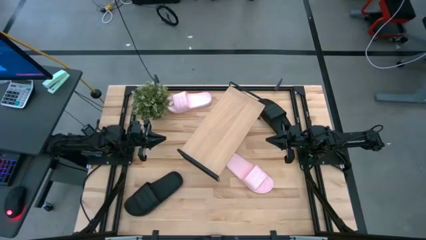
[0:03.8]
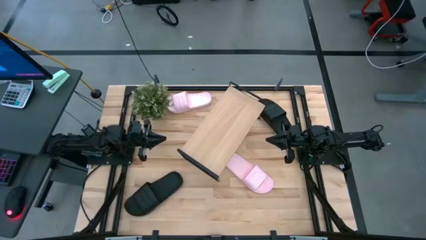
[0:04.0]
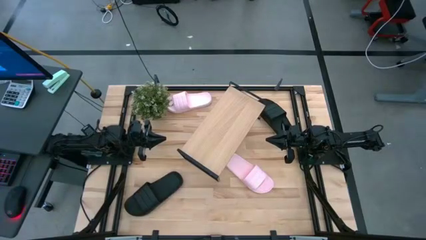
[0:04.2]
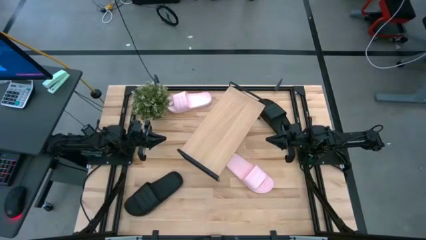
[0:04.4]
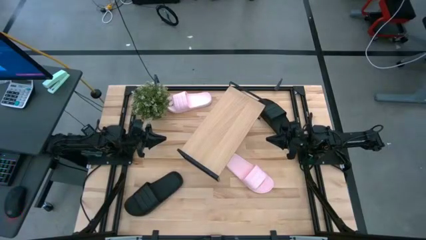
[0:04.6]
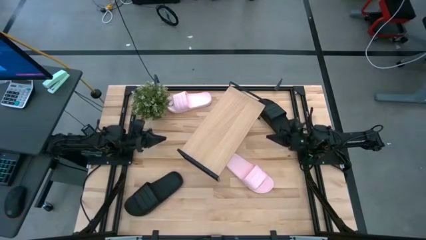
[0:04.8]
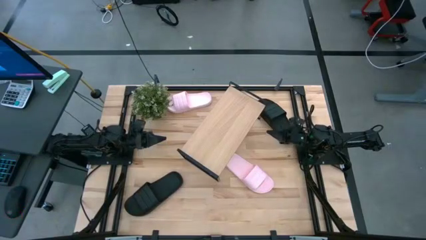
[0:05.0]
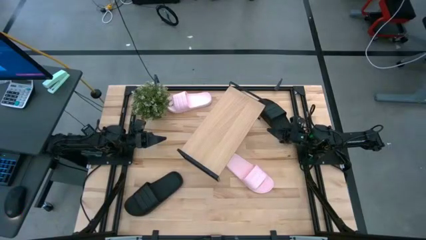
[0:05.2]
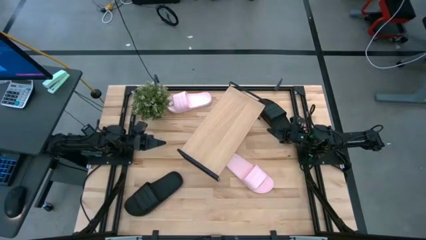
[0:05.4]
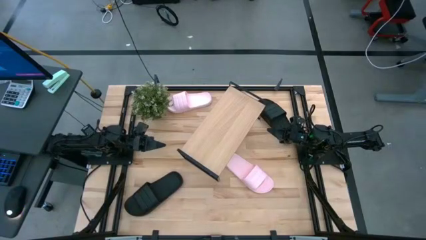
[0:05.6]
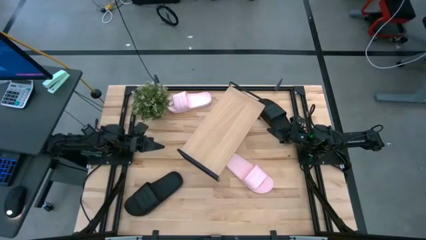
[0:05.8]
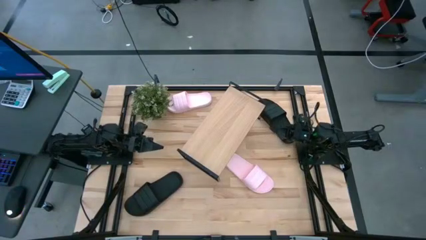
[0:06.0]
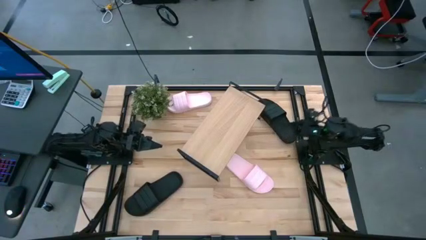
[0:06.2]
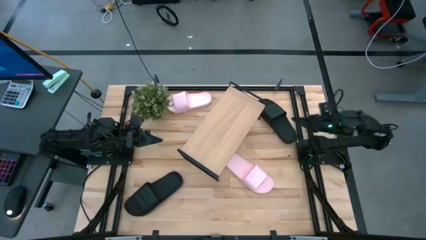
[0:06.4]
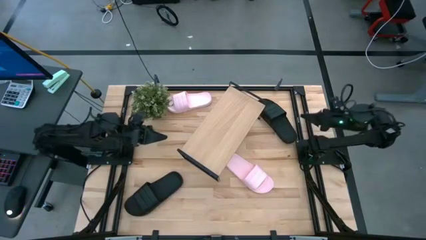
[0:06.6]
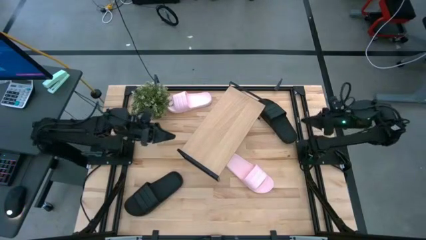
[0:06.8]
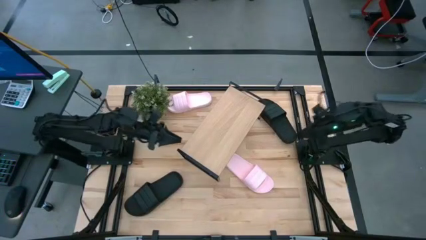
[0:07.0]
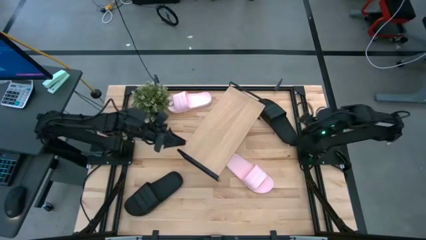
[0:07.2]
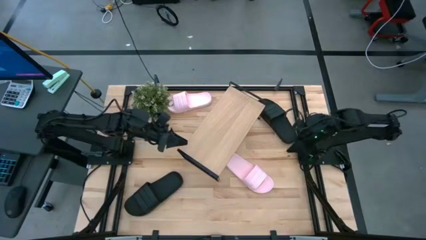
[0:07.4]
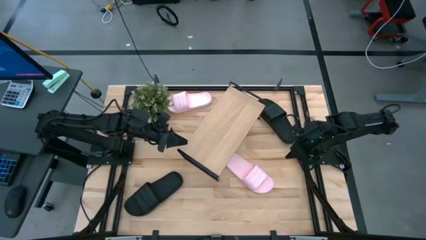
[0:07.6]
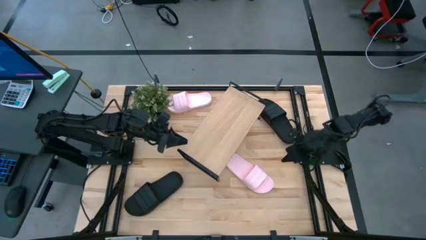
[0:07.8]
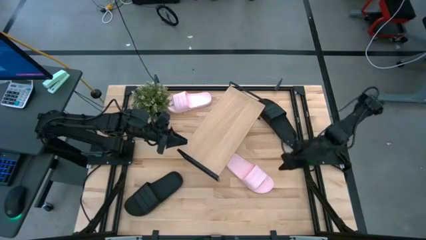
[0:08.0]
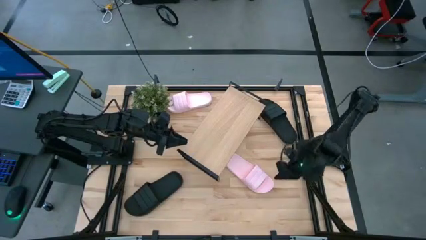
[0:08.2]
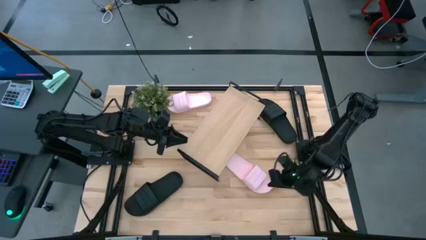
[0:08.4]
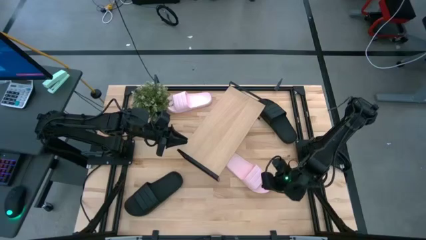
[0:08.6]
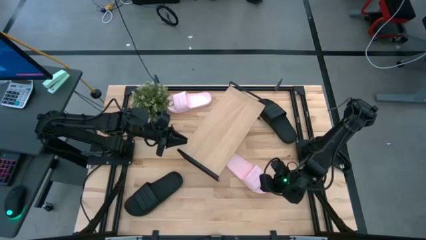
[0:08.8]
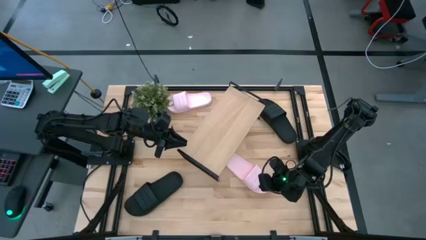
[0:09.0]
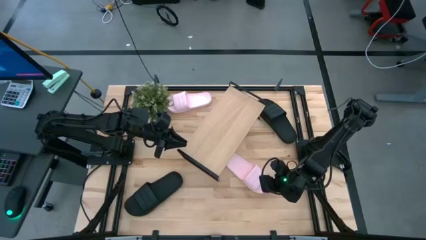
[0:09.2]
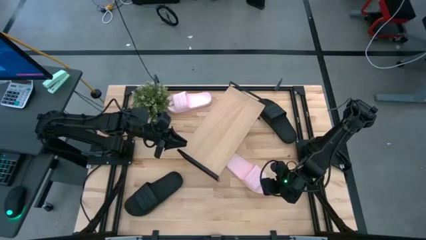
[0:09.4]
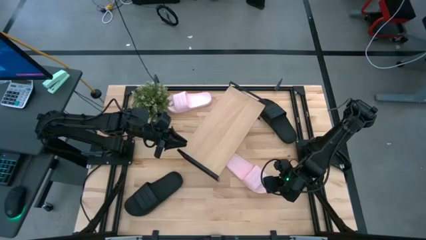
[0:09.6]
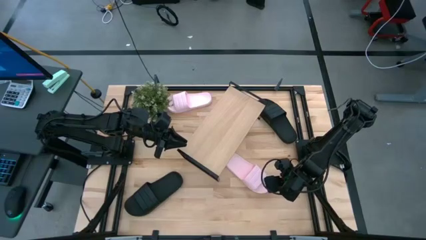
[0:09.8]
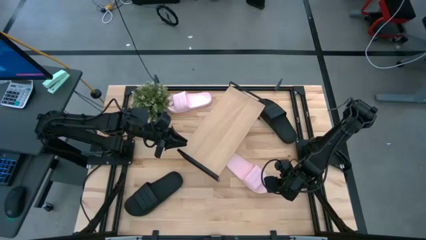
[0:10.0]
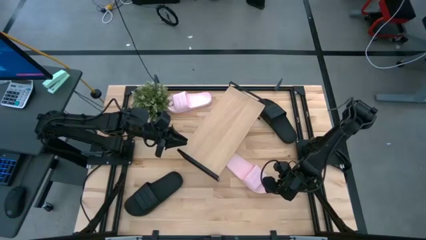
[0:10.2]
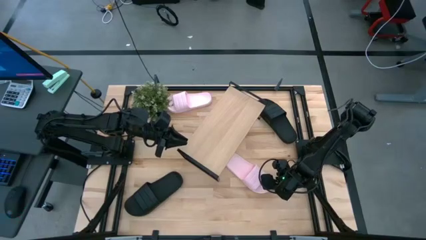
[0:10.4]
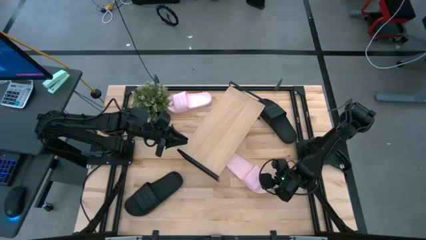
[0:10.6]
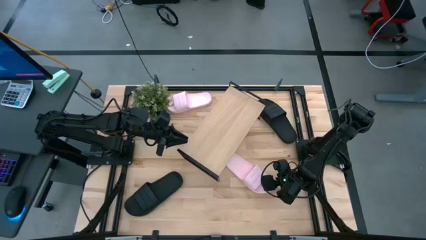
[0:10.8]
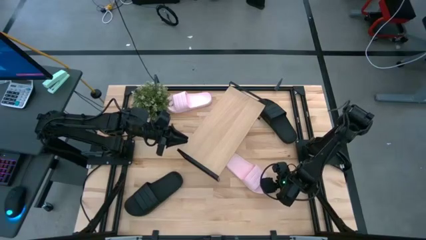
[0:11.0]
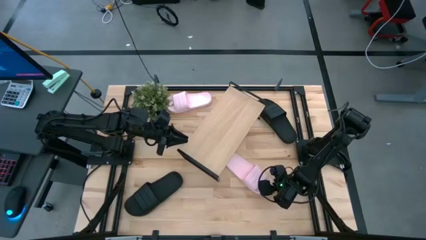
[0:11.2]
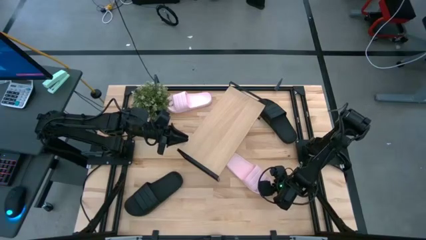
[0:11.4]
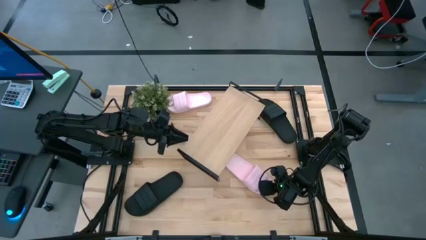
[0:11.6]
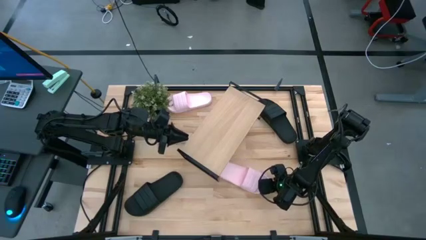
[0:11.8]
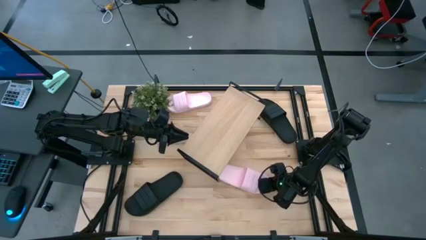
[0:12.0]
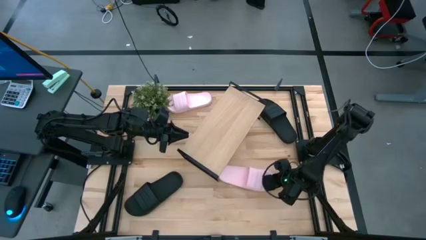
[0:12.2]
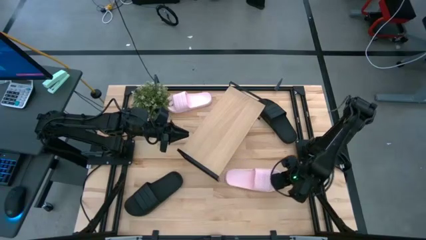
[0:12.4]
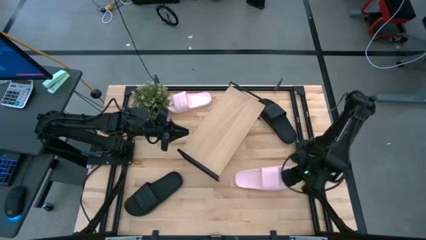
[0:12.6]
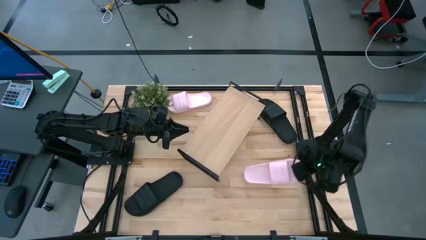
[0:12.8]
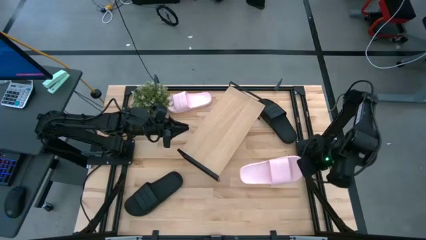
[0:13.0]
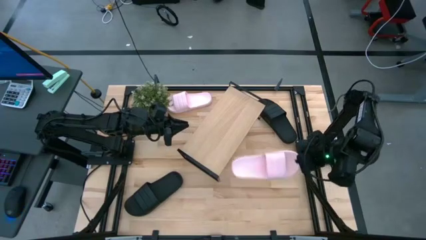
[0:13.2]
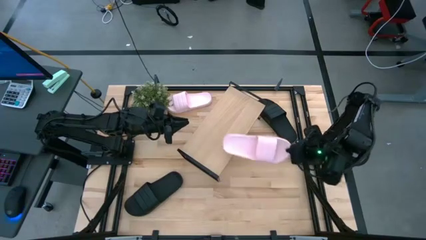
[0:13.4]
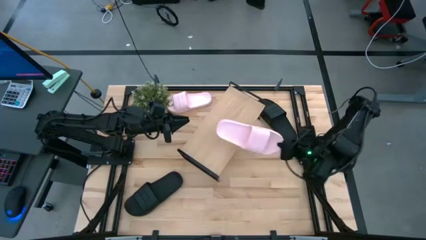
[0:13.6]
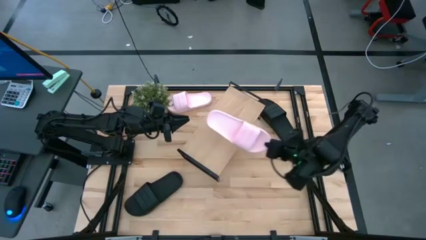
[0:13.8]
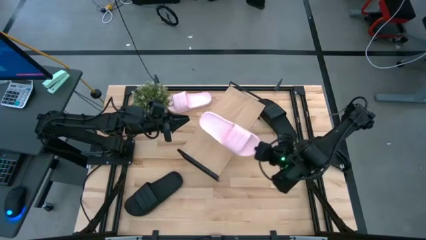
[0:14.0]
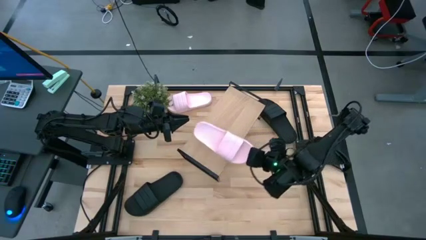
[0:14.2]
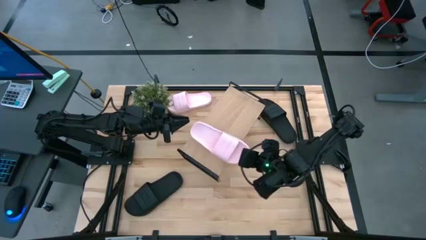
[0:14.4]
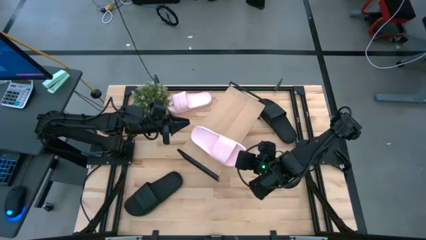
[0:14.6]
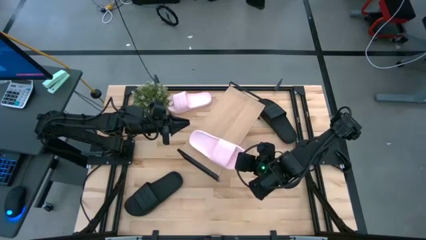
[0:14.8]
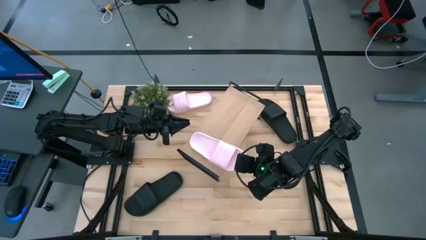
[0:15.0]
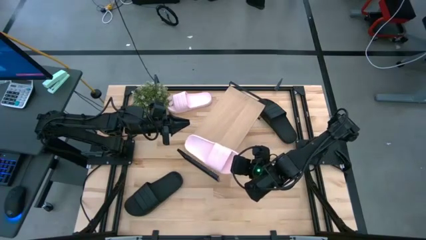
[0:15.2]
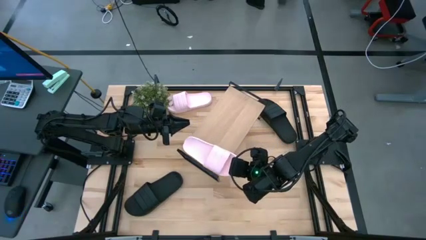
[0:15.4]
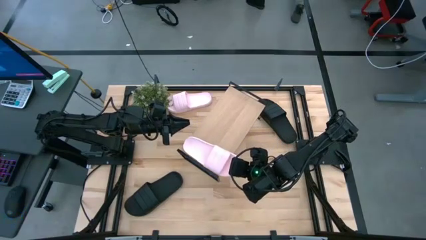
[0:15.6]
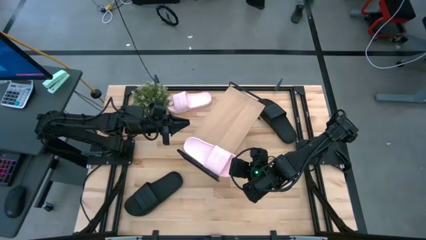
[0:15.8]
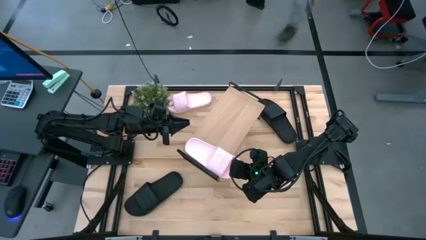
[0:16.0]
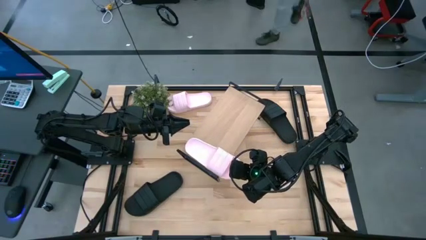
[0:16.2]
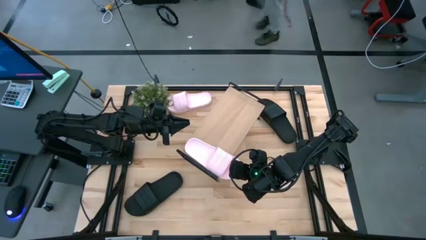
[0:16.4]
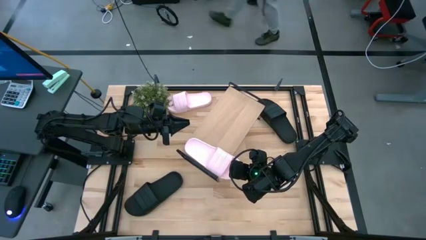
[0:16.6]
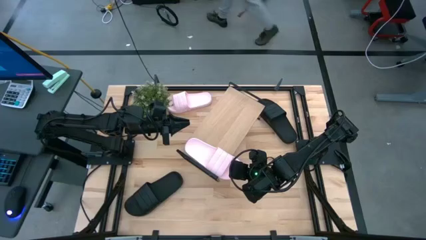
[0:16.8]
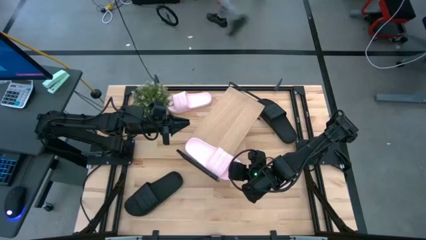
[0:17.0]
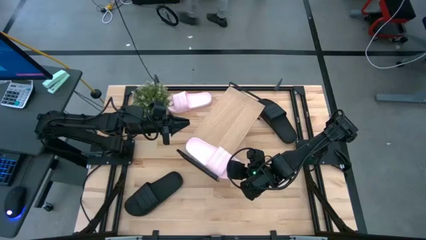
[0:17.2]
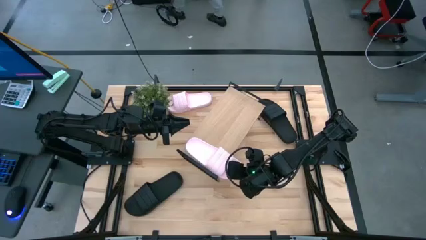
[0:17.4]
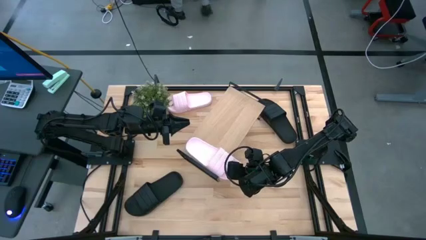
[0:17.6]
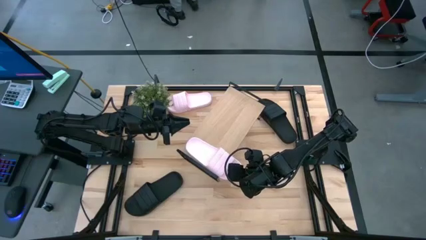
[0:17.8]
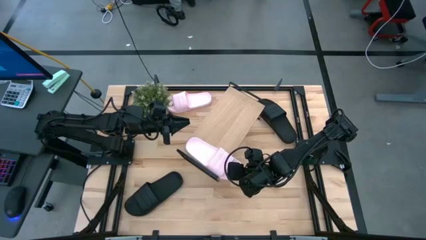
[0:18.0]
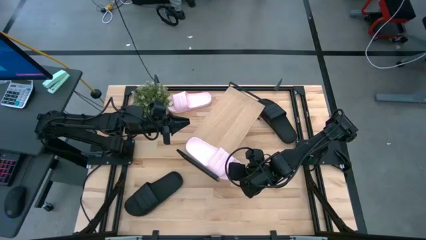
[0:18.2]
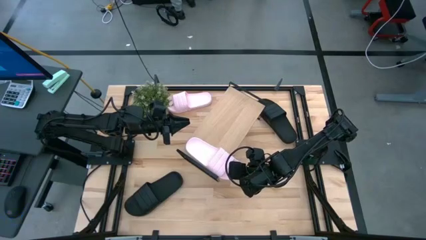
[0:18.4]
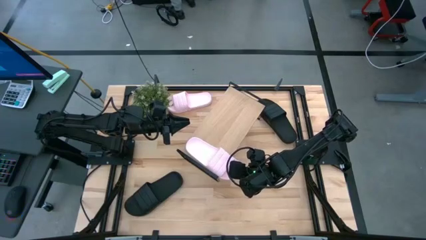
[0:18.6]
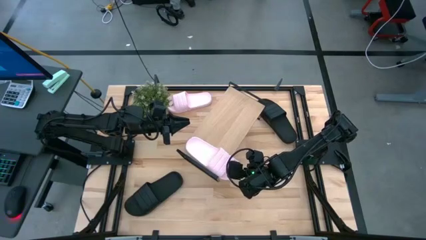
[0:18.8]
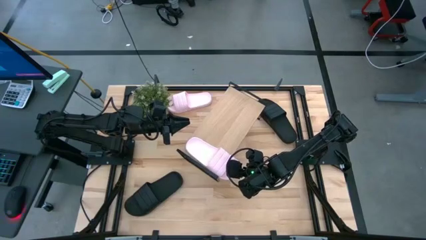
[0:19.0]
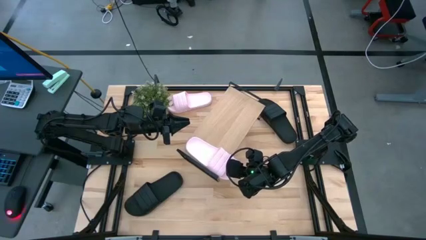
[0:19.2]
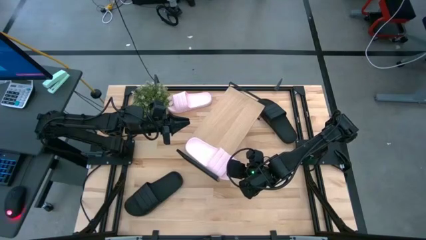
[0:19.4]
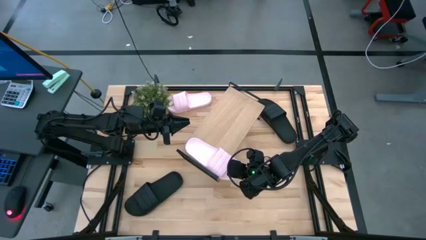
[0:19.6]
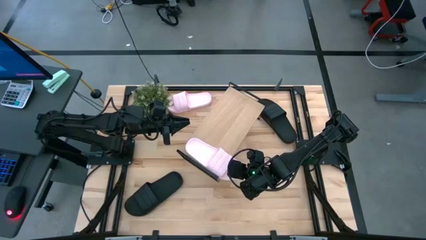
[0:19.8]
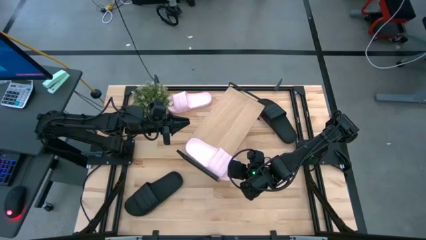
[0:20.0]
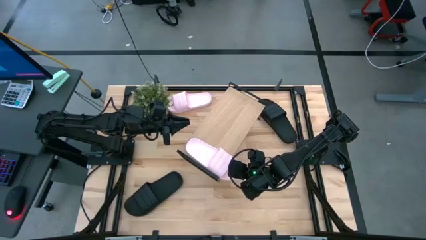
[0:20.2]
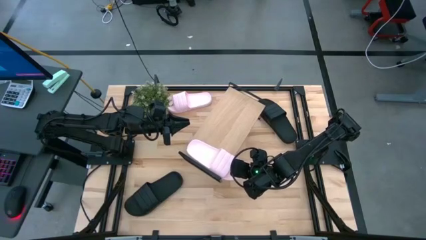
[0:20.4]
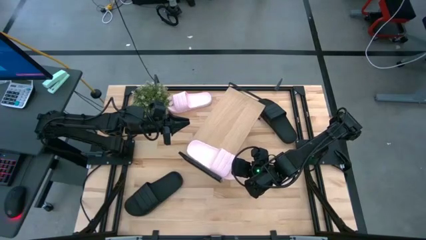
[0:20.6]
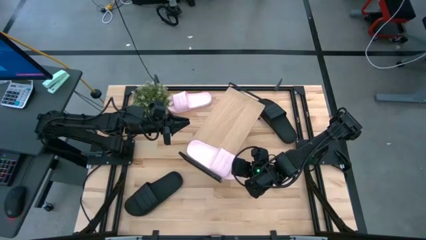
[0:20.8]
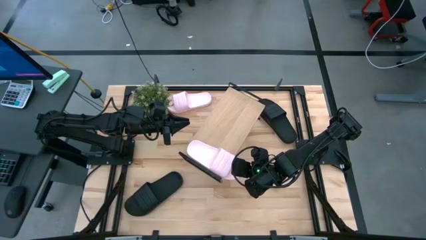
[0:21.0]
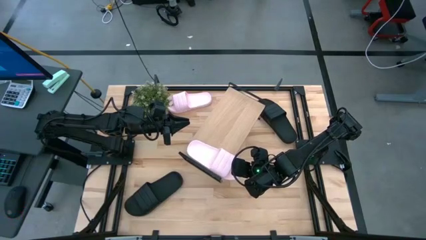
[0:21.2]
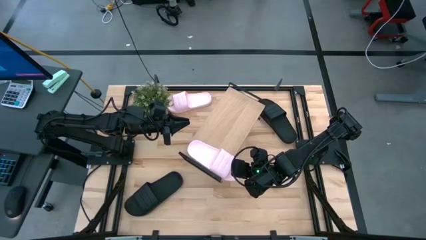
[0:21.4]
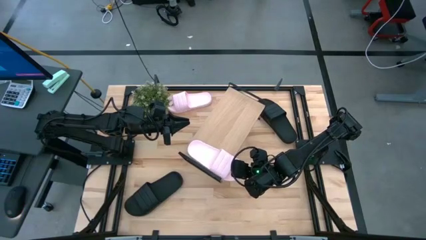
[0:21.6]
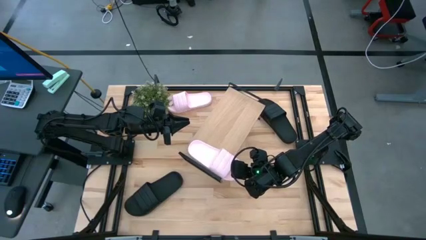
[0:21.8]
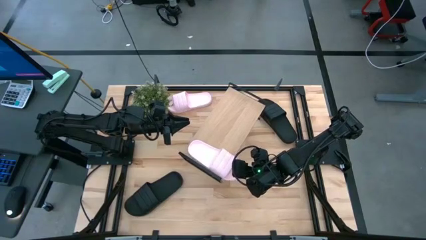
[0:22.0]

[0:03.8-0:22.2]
Task: Pick and place slides into the shelf
Put the bottom pink slipper on the shelf
